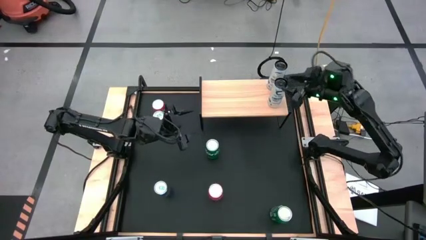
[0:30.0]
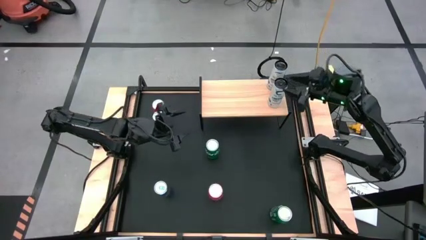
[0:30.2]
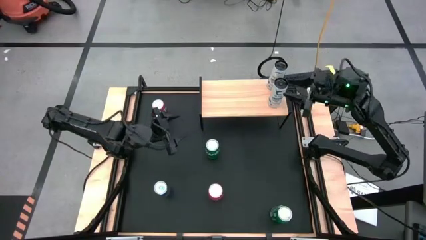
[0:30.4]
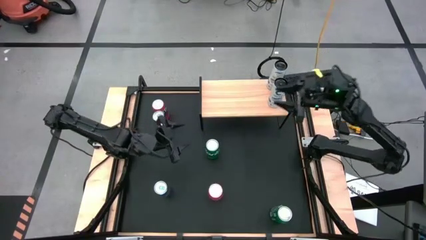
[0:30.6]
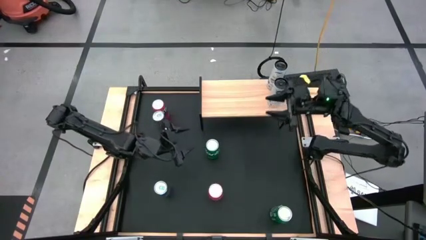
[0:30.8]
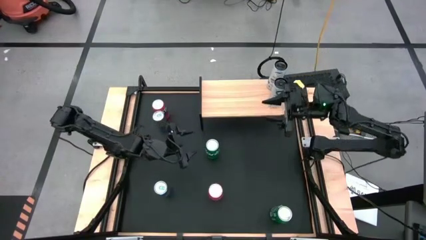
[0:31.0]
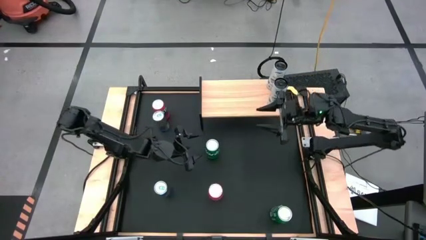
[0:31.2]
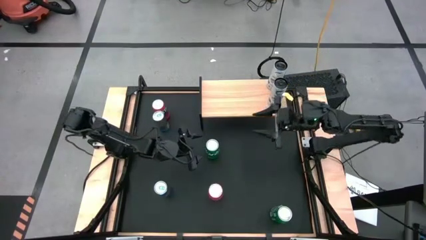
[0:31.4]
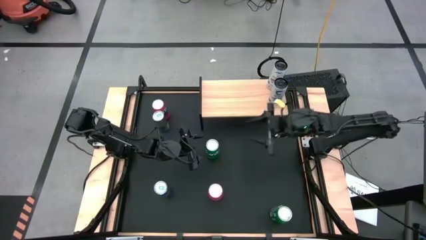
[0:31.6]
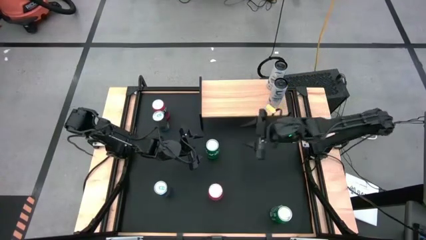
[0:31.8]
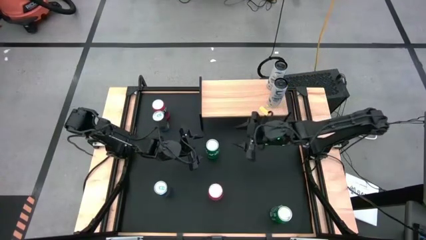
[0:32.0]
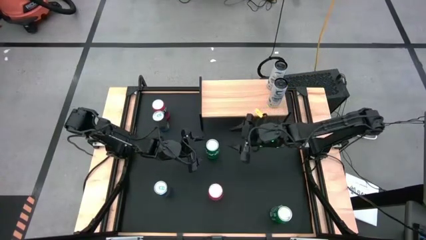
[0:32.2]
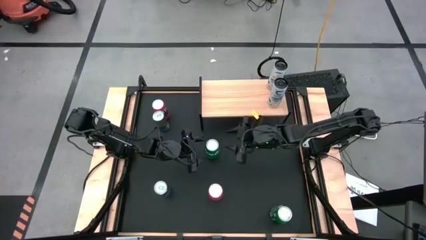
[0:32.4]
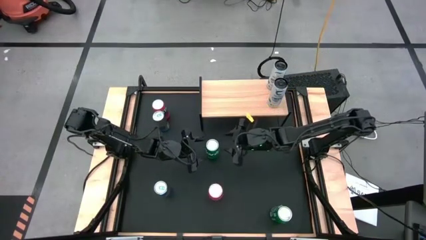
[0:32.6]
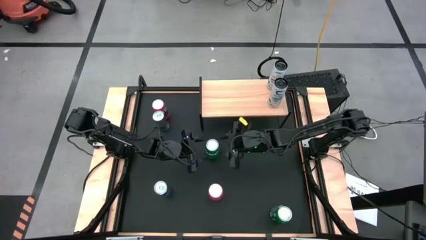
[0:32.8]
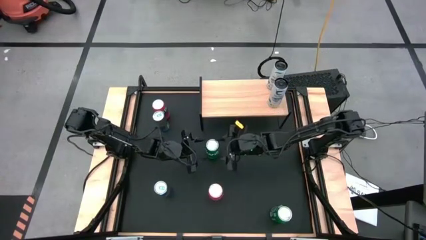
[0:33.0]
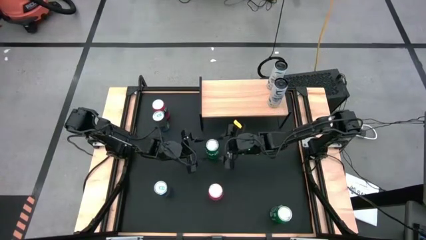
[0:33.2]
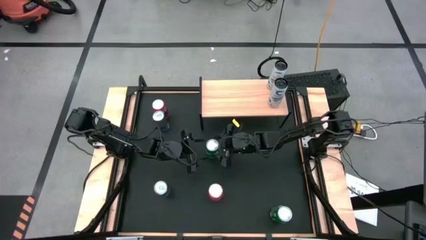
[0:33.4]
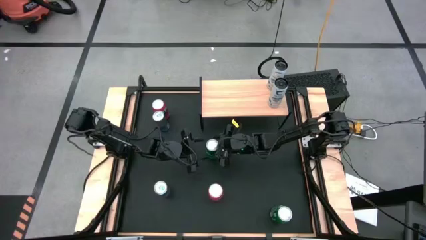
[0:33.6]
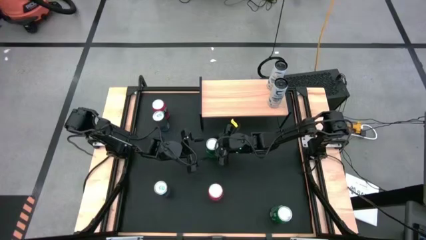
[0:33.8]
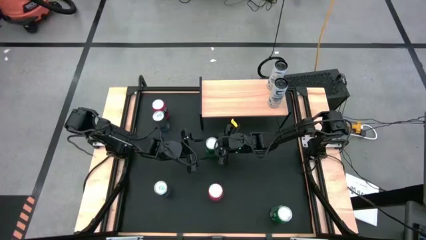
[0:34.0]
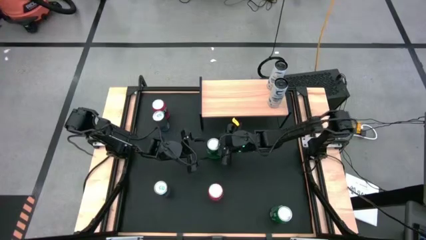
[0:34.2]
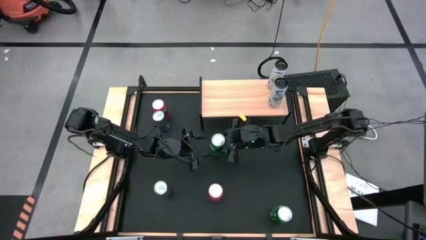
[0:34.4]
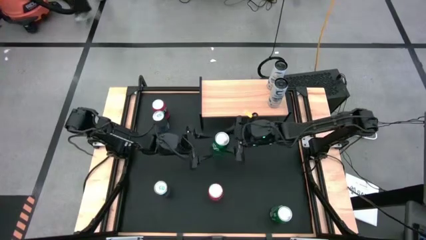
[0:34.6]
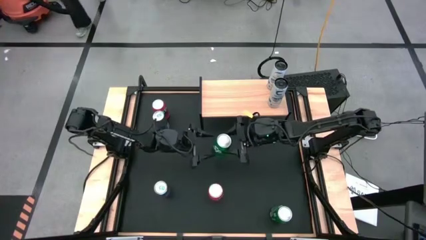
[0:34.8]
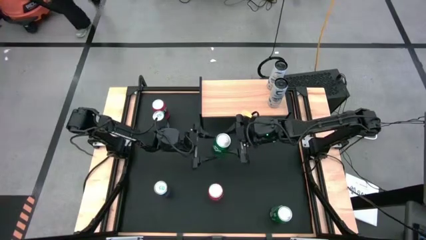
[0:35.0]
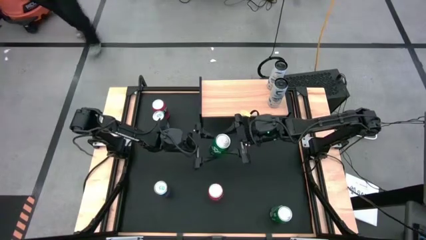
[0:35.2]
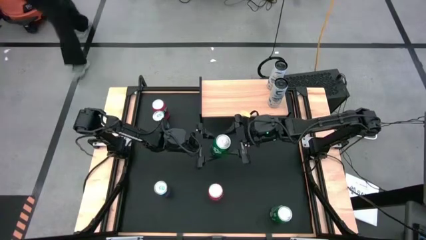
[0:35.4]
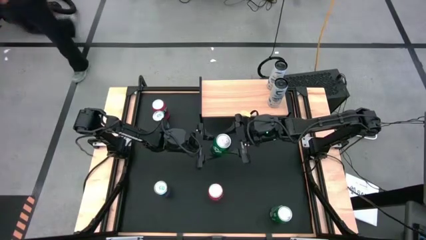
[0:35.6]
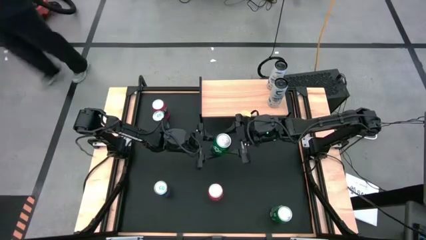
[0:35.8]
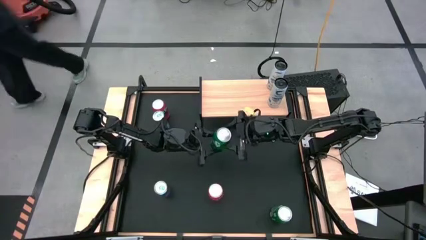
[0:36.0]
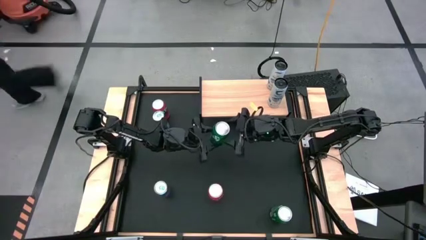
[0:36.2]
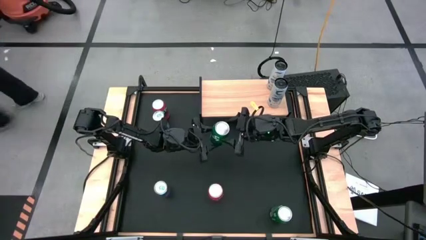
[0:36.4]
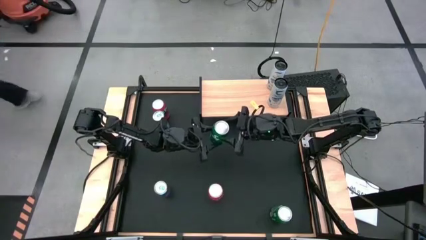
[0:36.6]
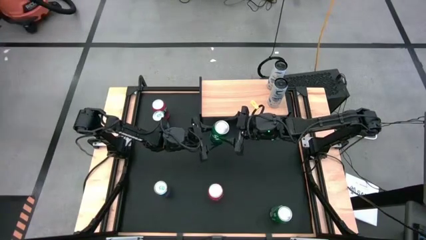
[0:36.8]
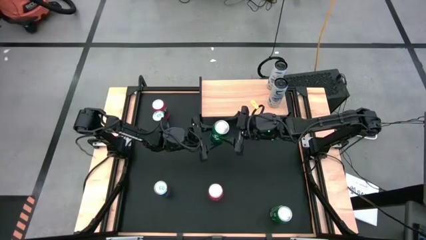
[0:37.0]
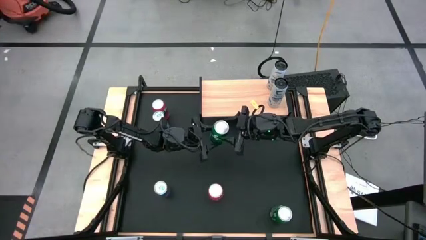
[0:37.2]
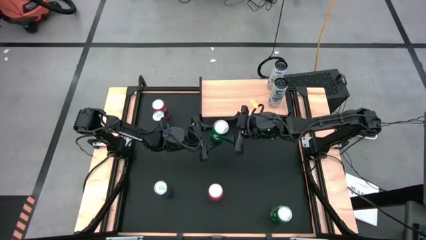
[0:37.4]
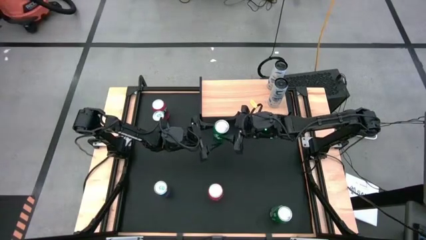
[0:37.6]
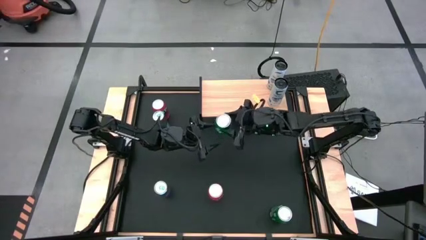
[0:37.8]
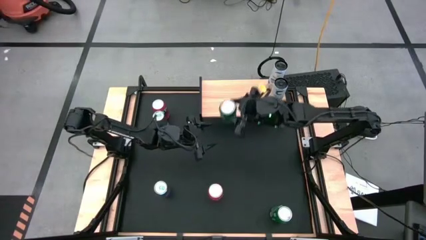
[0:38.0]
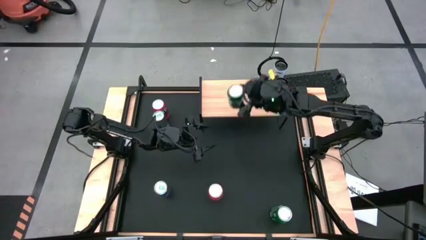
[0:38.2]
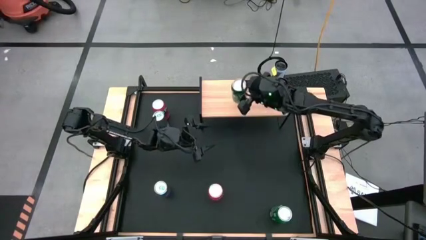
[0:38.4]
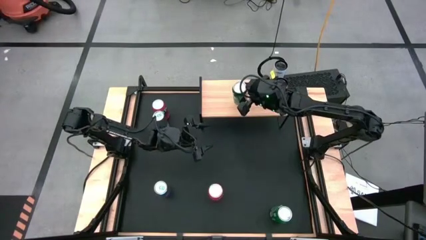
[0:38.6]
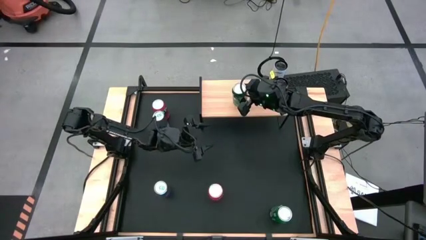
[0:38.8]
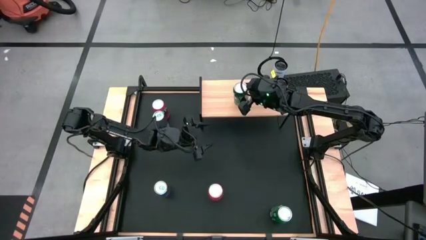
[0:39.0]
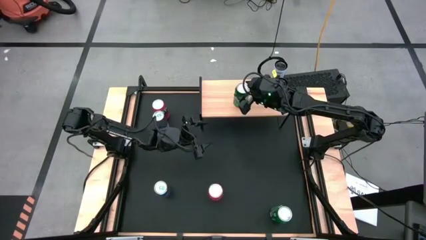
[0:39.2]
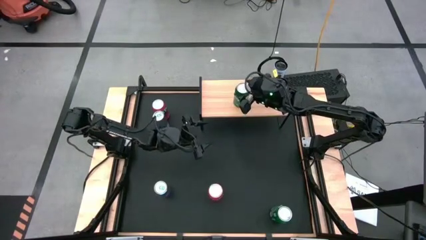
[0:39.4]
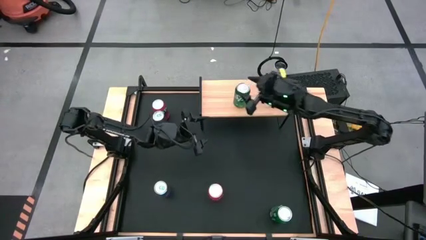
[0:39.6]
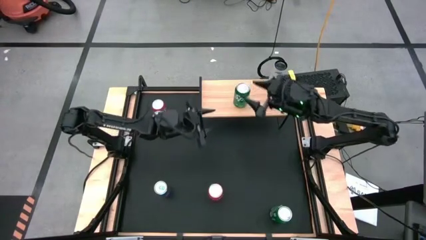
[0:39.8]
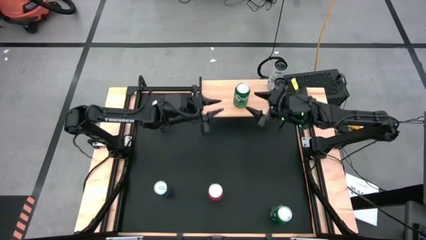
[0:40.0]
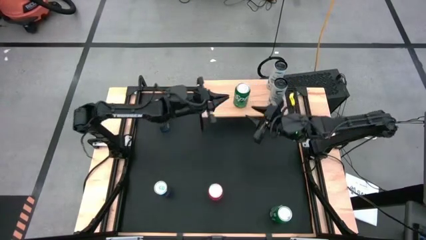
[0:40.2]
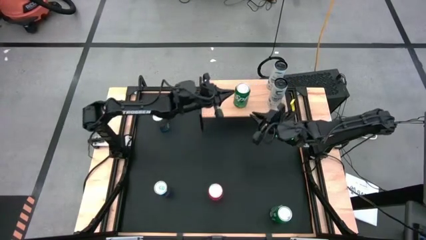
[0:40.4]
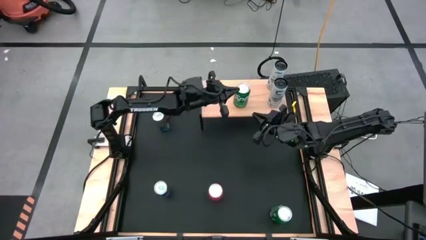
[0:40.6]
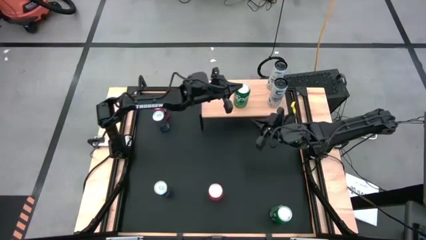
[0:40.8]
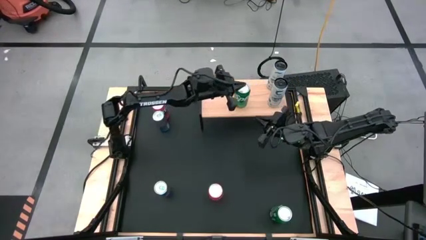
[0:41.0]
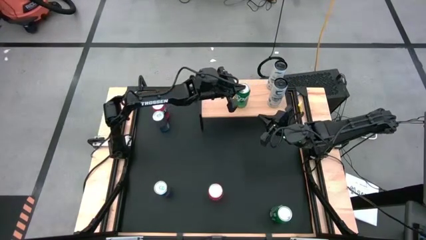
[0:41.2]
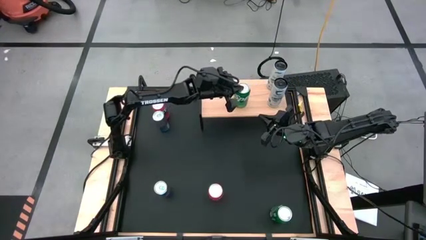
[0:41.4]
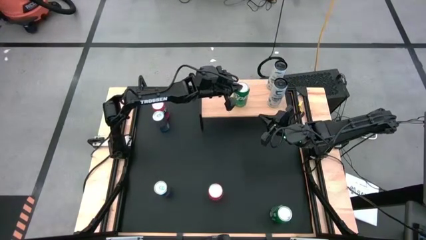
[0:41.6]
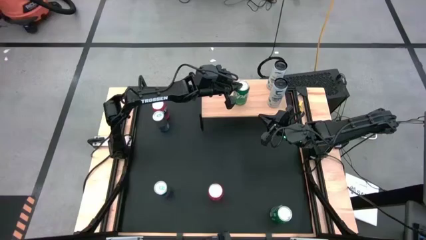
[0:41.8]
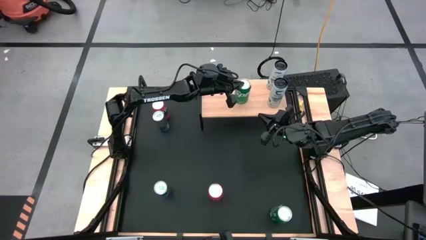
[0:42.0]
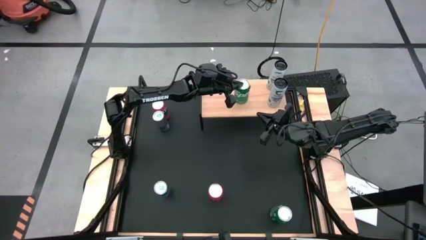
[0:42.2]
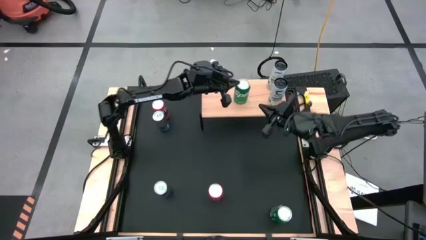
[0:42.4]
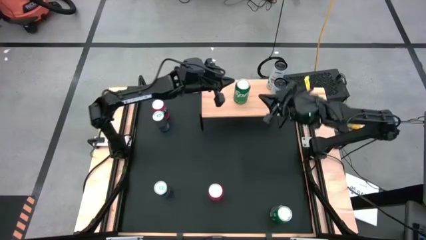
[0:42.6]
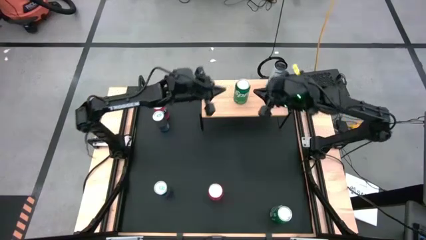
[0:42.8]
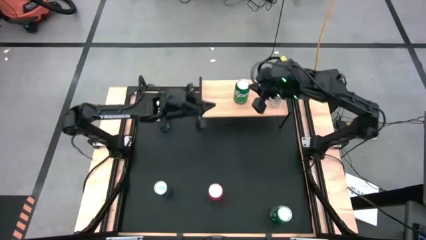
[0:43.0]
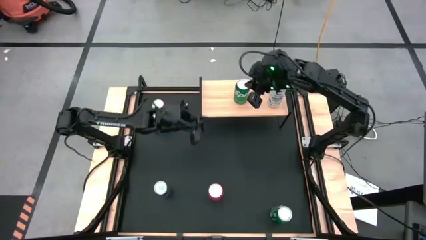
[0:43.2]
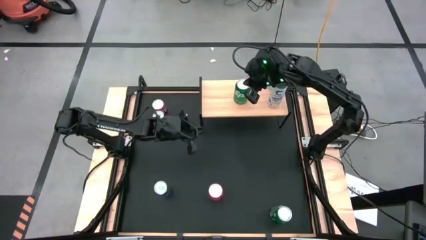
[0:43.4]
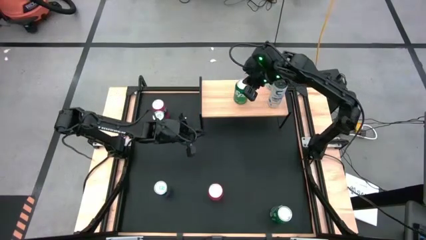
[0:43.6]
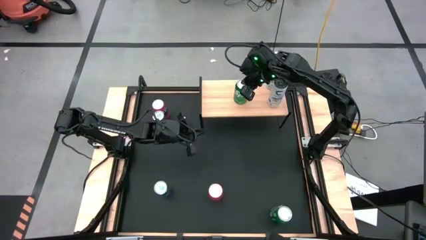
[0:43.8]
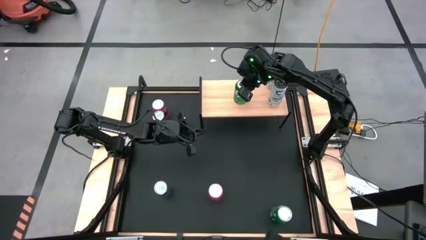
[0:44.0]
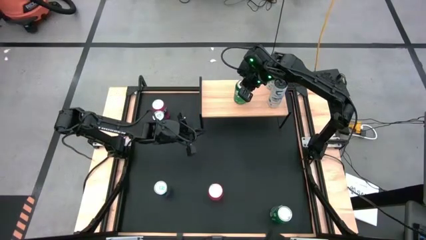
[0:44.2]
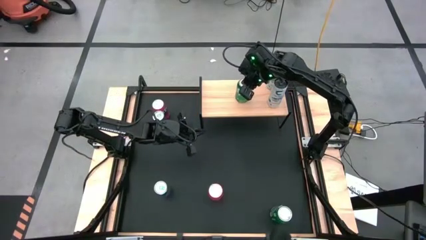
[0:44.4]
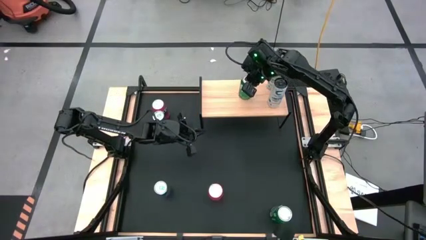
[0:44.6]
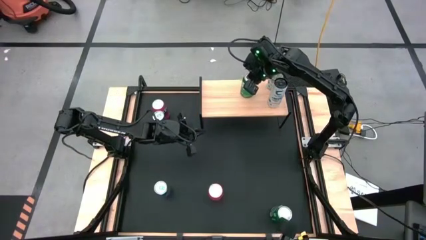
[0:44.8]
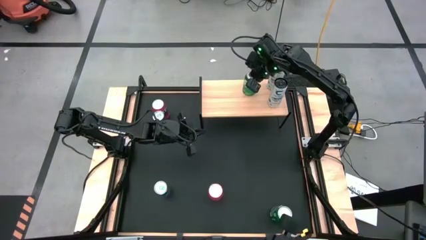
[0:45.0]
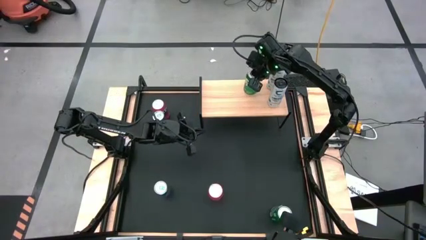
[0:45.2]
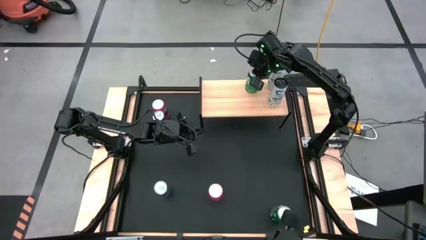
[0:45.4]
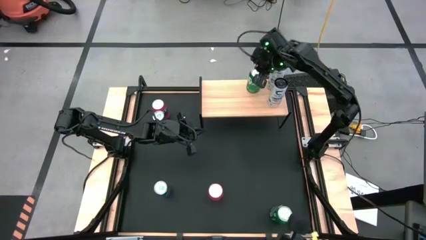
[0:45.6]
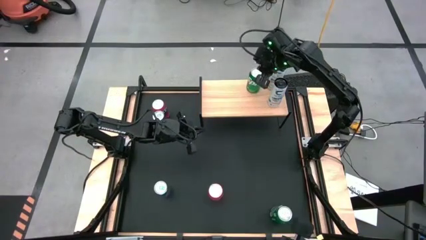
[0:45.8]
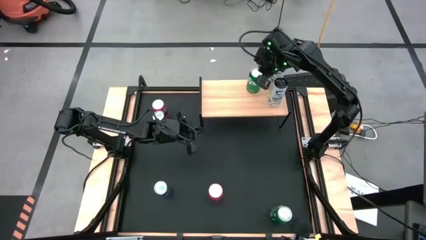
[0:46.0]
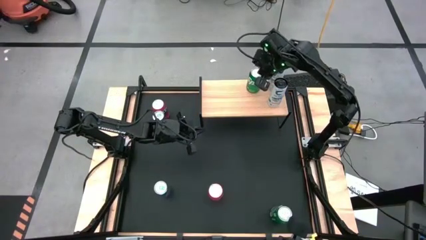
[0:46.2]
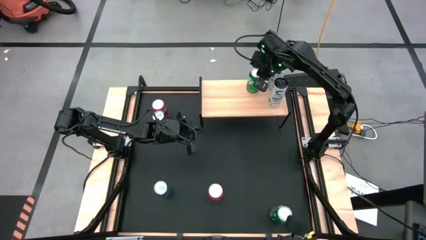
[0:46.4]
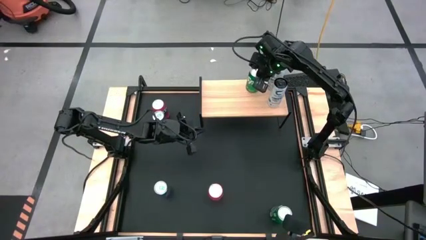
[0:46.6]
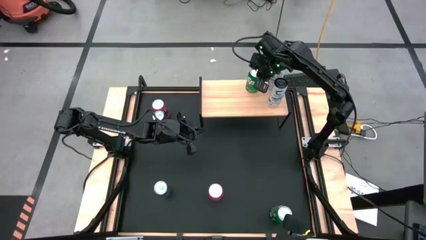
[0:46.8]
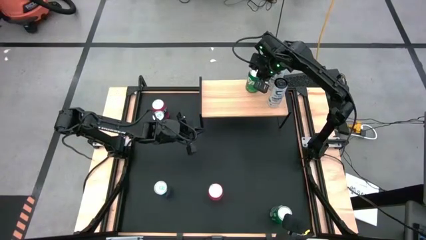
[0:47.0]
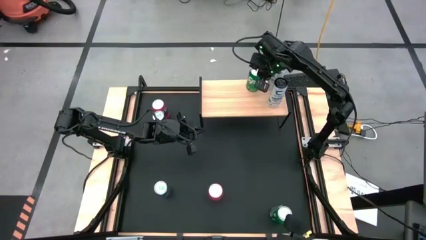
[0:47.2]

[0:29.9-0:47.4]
Task: Place canned beverage on shelf
Put the top green soda can on the shelf
